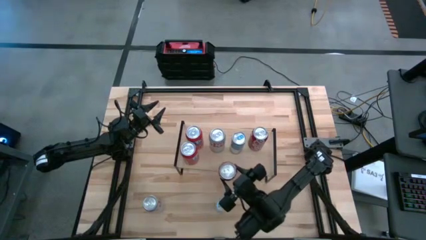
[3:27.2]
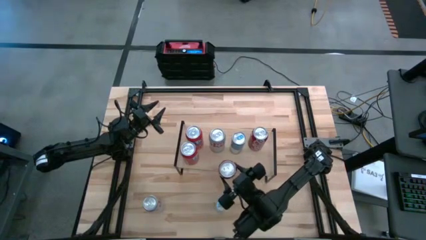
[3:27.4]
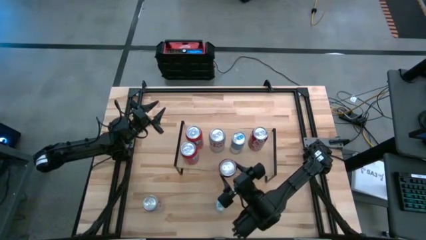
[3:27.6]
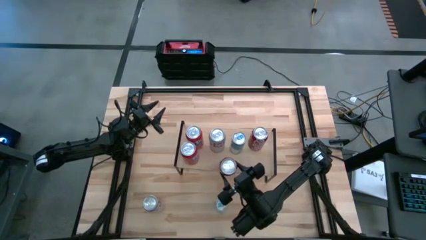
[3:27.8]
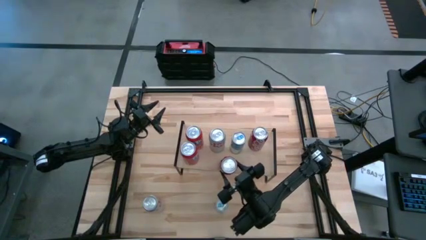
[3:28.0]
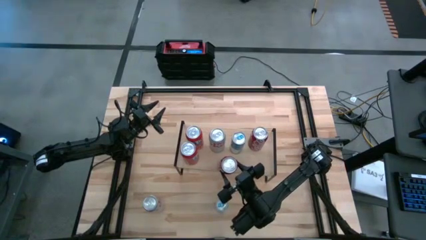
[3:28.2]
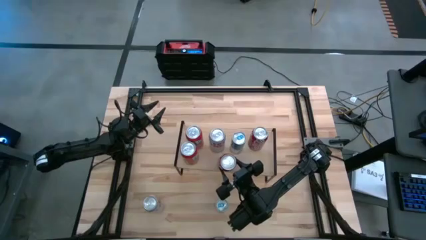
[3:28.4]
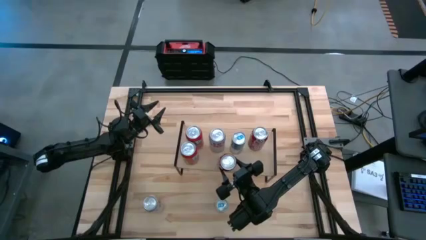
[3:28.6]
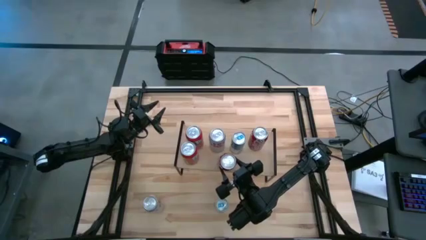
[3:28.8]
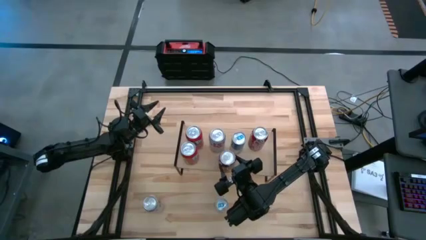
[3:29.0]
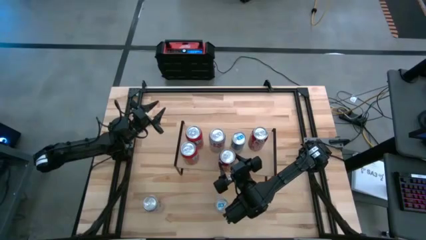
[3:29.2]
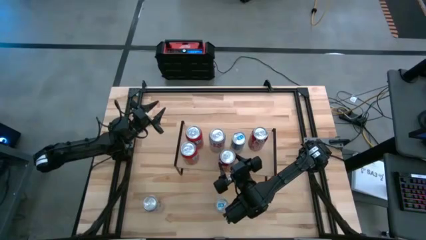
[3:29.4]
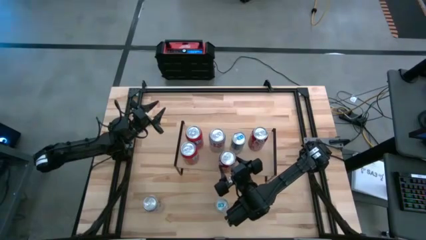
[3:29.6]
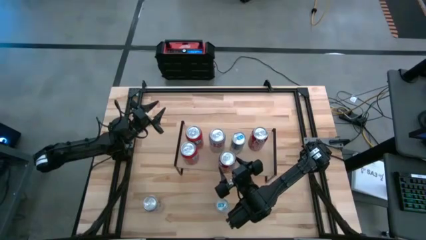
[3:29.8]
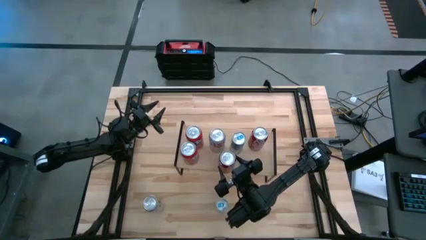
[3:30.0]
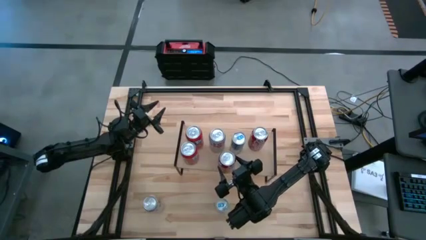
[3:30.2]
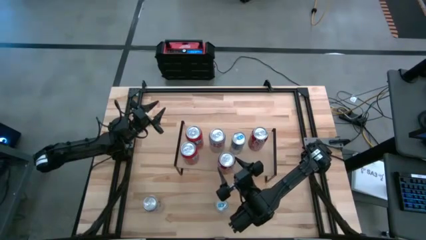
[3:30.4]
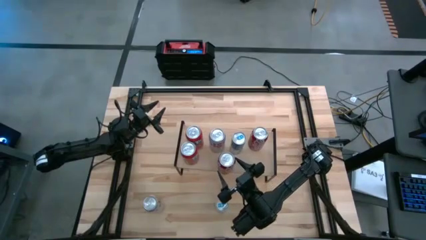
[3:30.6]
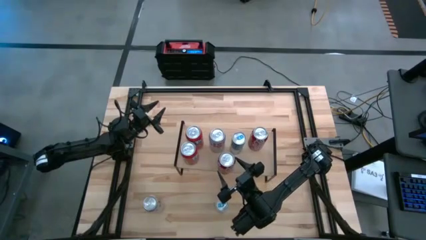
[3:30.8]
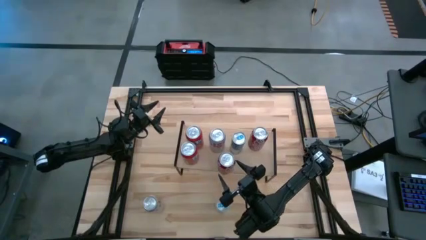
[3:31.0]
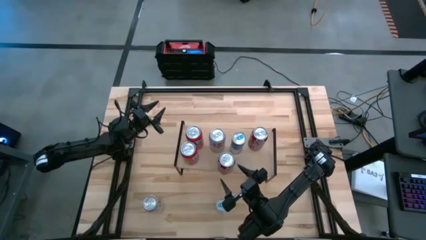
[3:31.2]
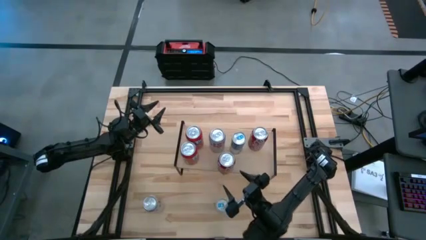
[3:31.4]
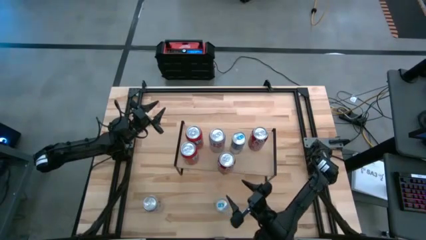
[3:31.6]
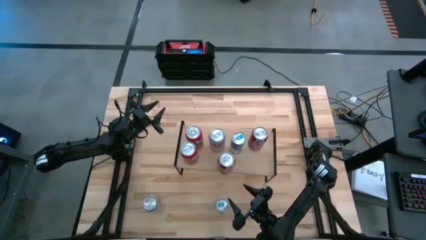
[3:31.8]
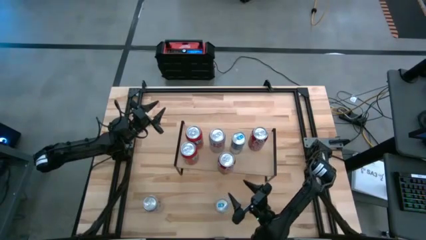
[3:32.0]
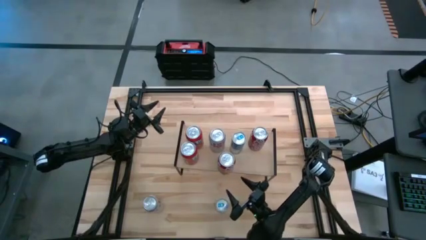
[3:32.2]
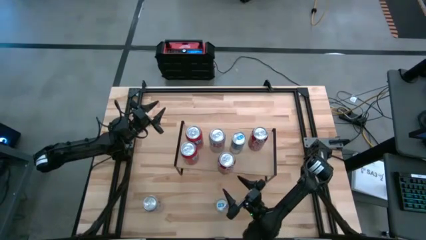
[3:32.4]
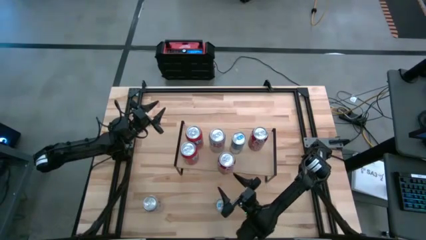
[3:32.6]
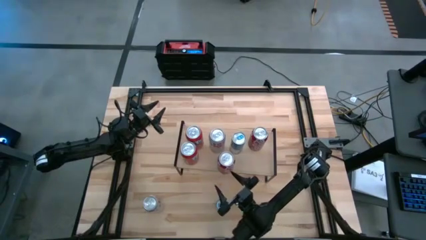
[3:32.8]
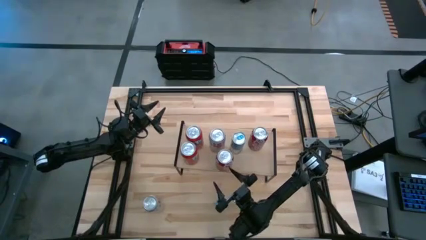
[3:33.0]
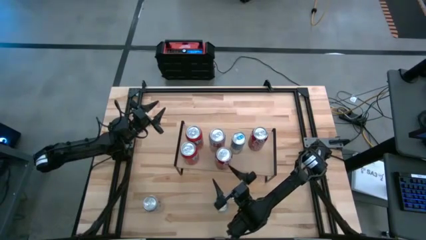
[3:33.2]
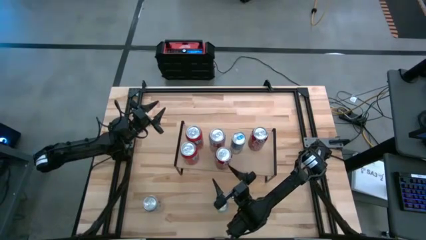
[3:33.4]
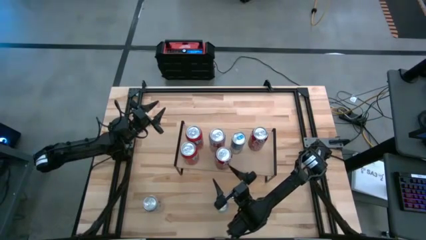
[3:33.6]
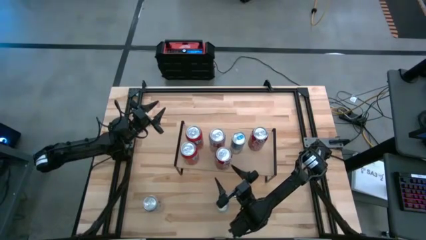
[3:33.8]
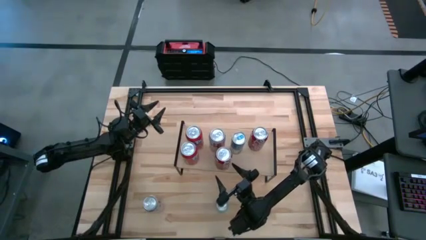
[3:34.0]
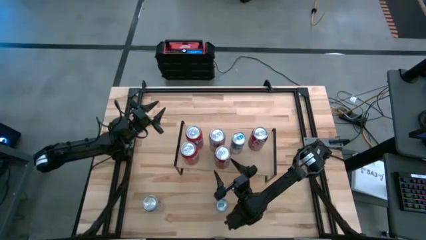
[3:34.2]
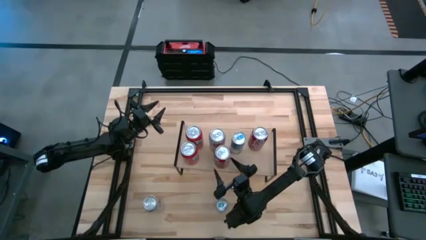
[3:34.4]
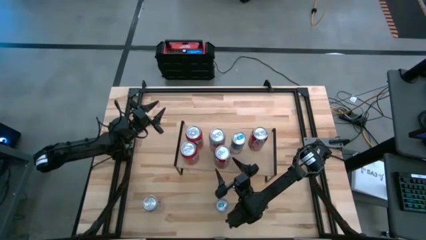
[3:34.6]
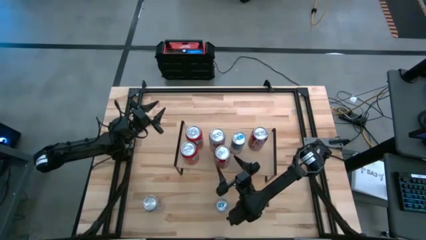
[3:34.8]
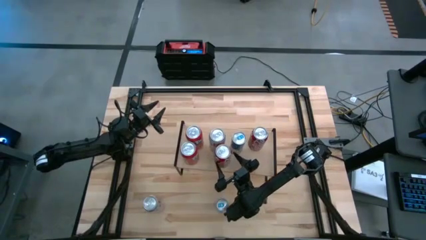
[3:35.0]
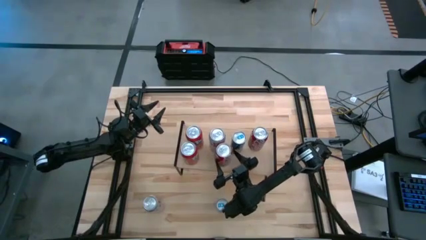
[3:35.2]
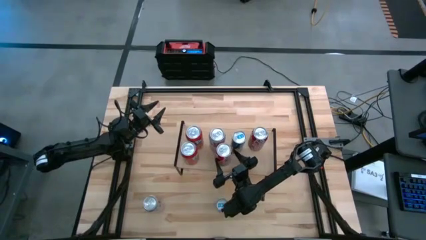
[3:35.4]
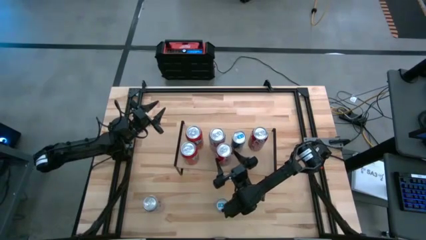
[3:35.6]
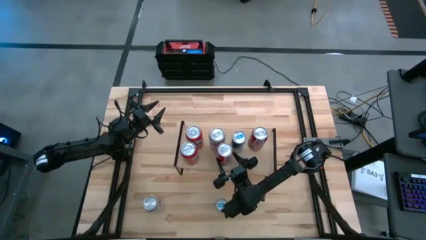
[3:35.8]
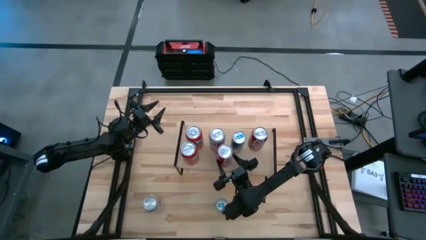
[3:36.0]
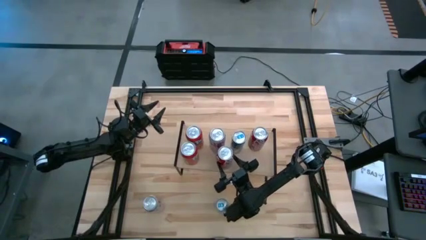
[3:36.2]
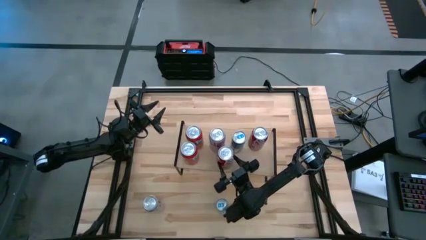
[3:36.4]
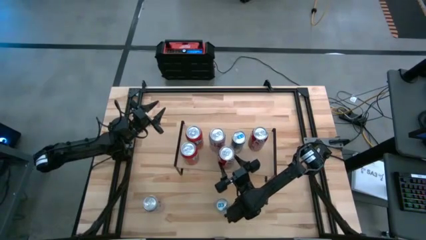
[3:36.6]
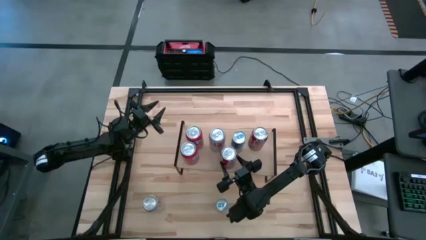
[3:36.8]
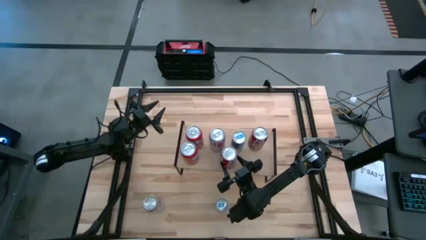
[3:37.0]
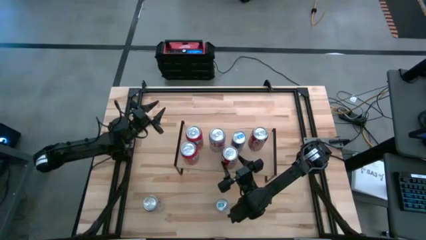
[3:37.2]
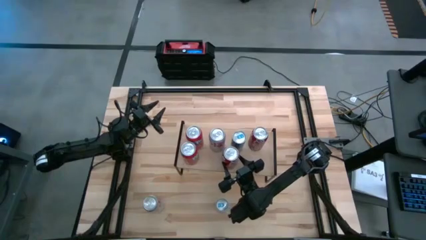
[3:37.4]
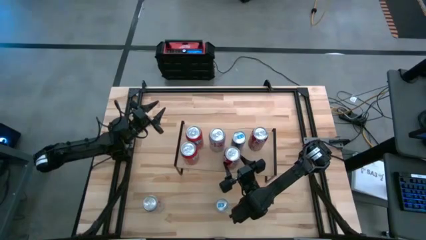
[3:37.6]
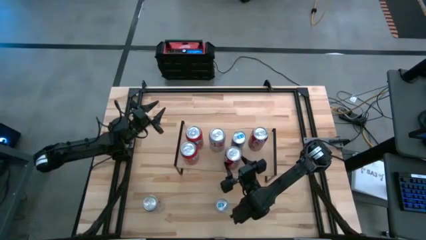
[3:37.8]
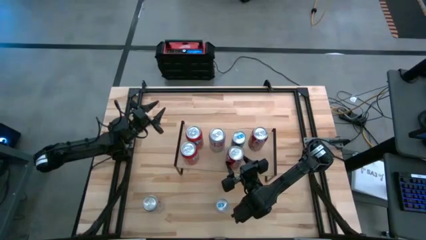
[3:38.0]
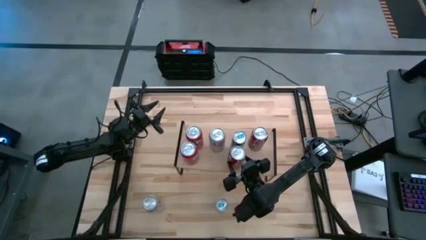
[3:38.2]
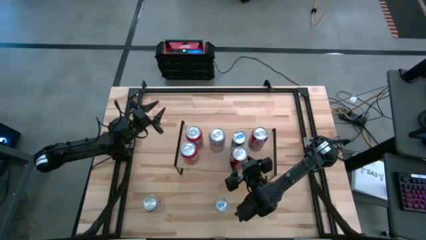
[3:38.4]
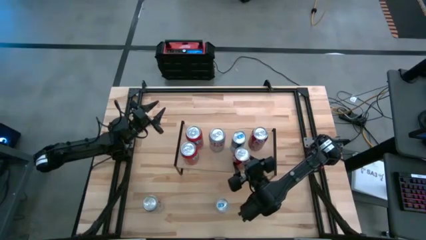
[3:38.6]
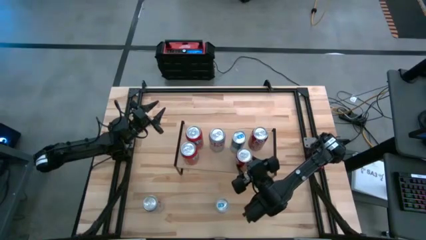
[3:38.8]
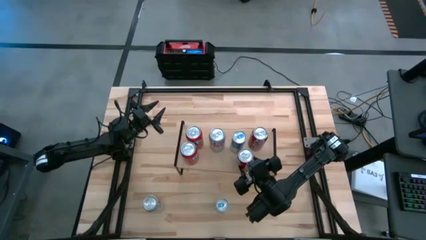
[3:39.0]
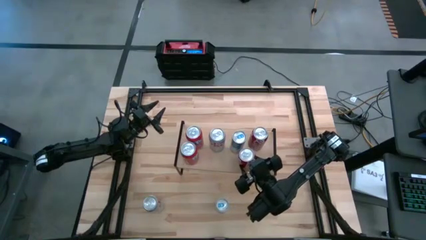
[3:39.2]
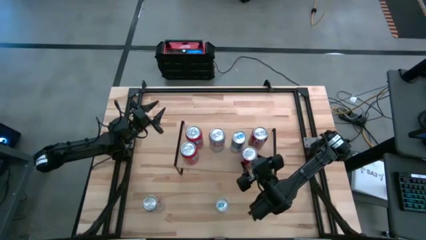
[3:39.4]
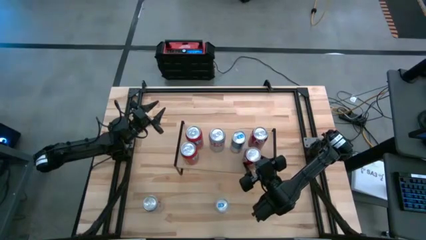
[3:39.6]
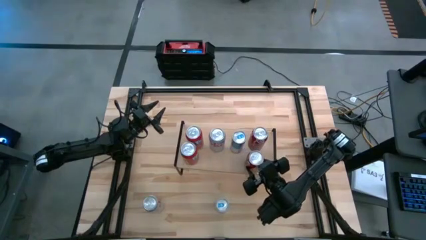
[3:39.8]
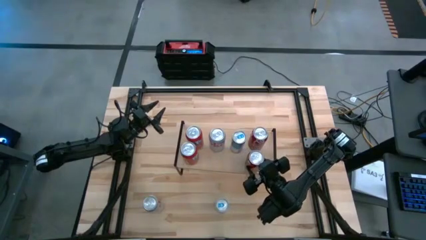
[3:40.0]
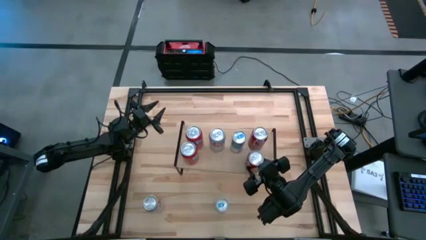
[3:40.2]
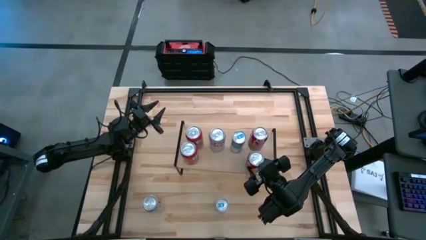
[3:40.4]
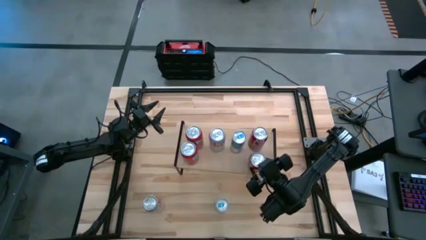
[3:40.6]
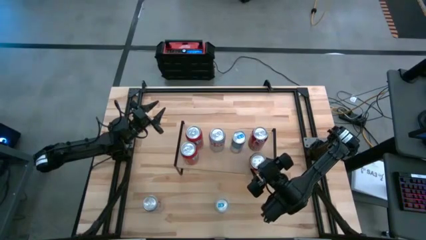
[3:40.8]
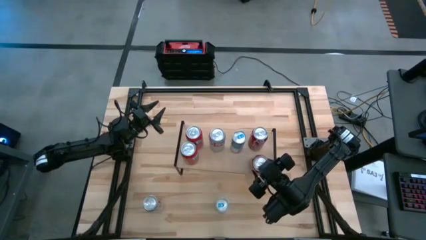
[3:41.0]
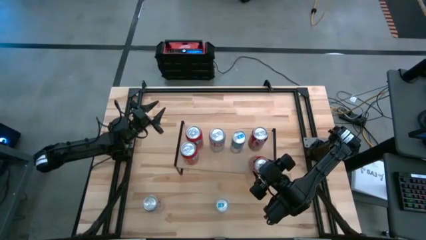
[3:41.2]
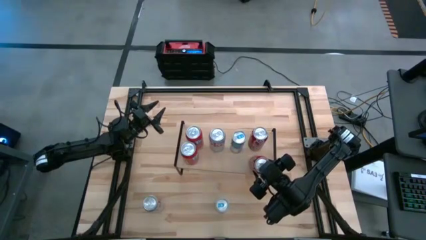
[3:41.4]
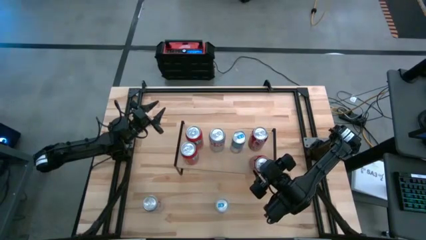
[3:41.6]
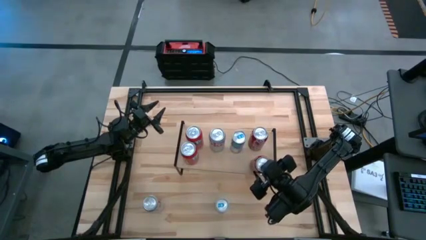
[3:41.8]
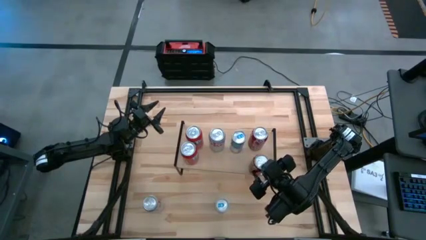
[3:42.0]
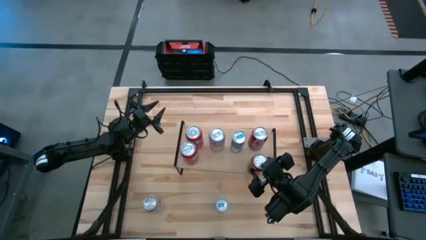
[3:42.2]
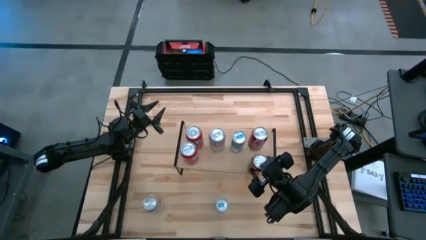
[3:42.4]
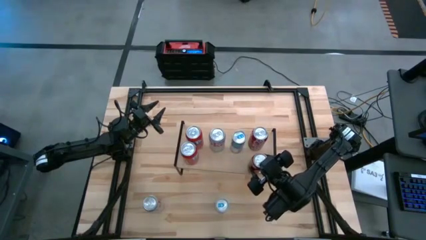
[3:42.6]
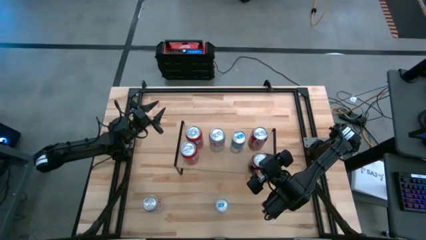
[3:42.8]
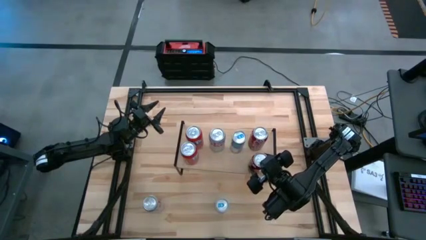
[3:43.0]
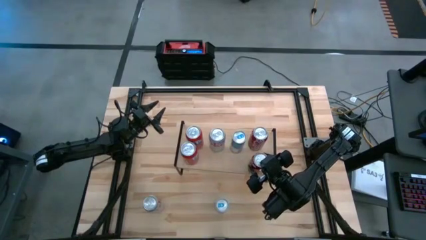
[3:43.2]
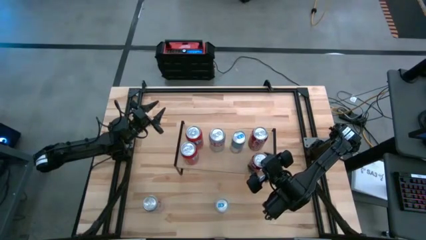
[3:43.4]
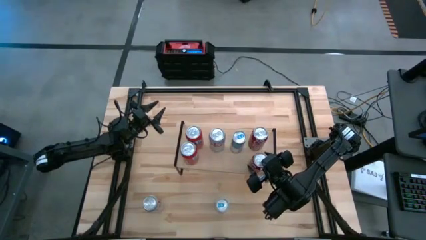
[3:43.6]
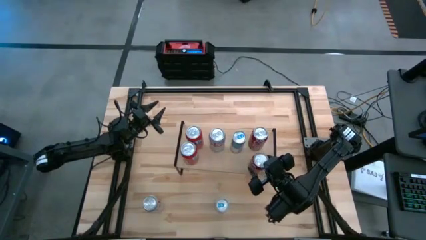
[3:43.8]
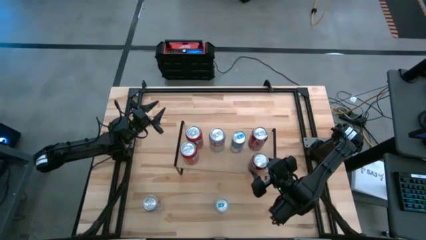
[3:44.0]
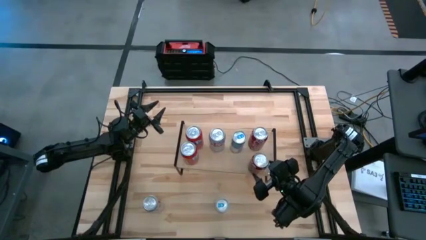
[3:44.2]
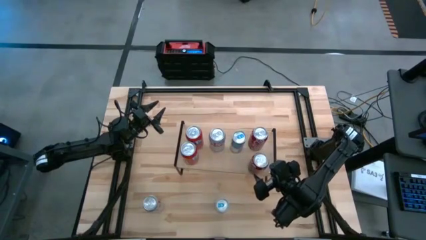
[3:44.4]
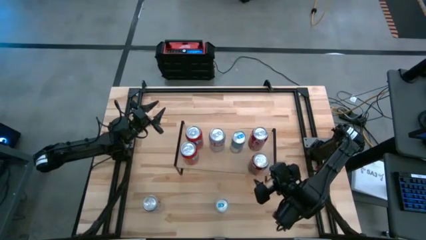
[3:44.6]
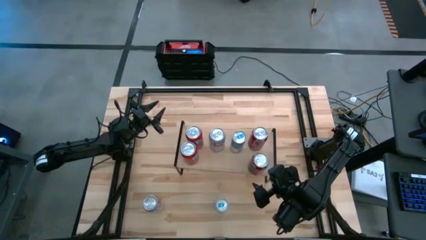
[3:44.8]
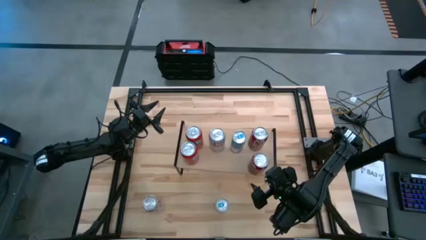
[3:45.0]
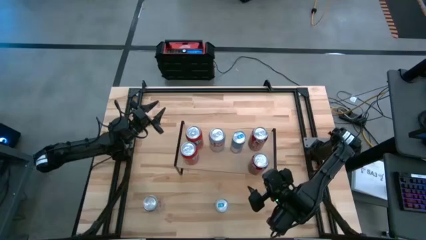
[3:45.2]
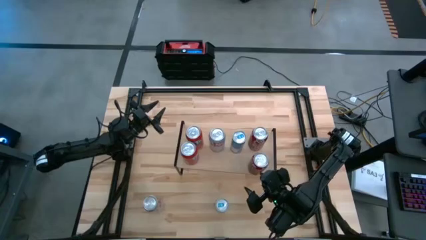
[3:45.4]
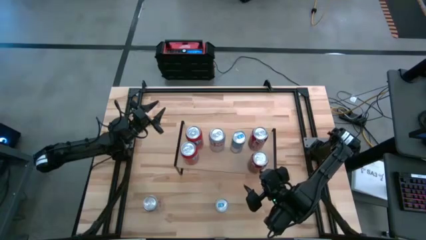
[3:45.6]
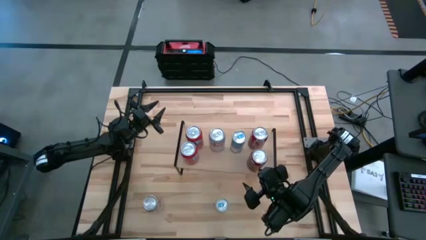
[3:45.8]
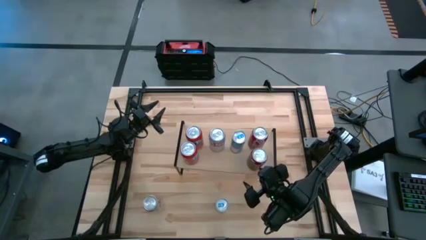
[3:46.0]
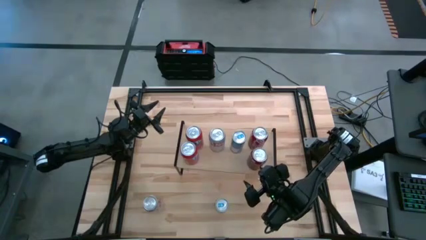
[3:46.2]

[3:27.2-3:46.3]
Task: Place canned beverage on shelf
Put the red soda can on the shelf
